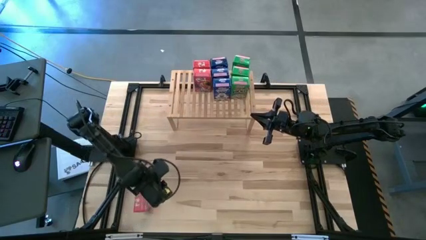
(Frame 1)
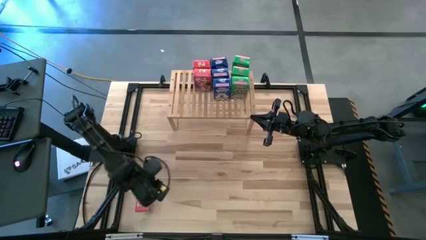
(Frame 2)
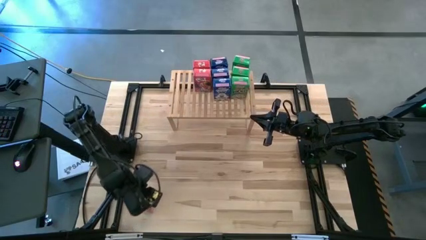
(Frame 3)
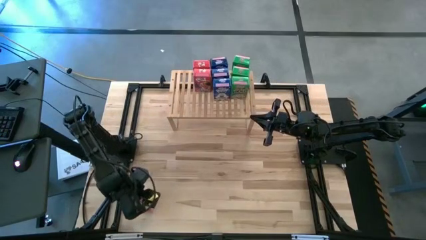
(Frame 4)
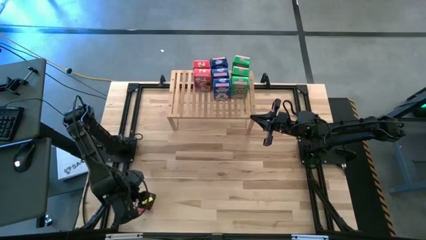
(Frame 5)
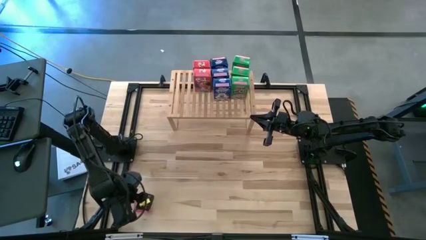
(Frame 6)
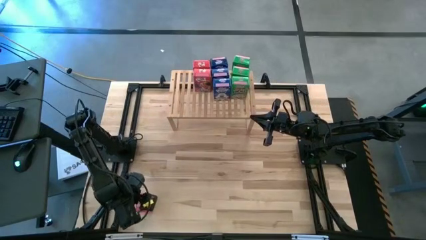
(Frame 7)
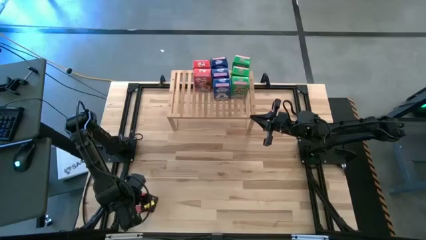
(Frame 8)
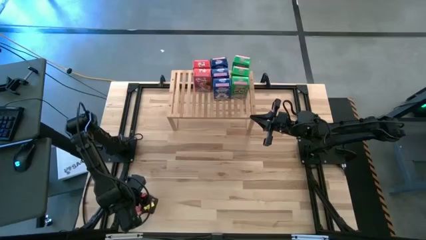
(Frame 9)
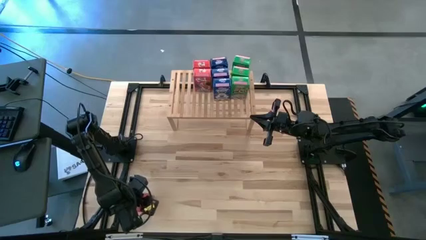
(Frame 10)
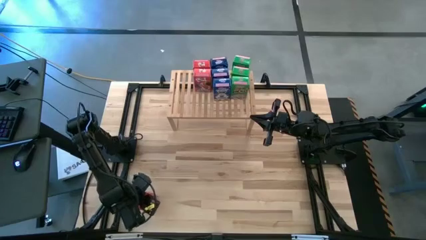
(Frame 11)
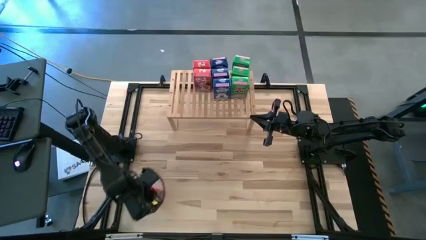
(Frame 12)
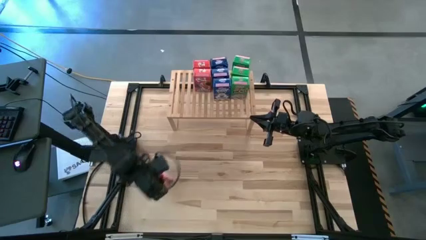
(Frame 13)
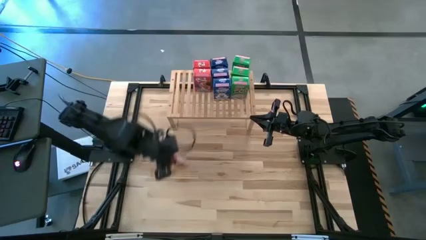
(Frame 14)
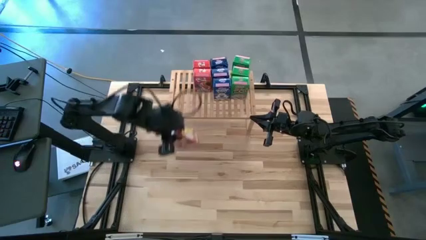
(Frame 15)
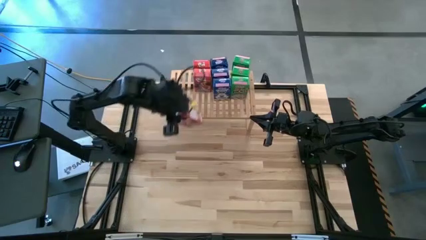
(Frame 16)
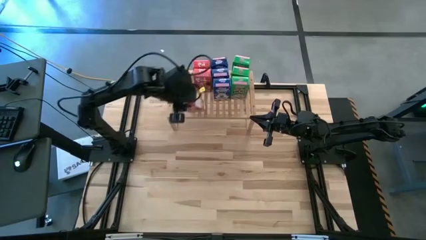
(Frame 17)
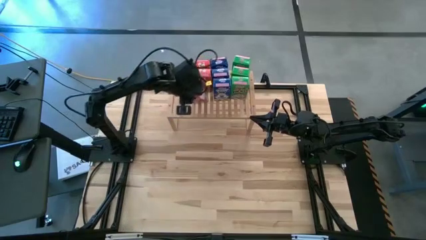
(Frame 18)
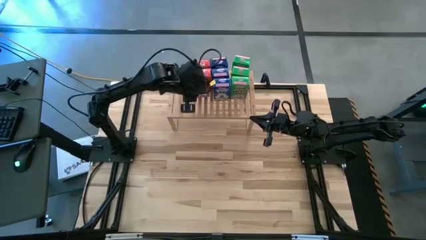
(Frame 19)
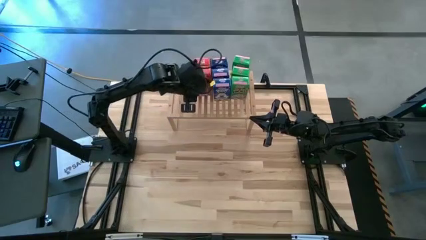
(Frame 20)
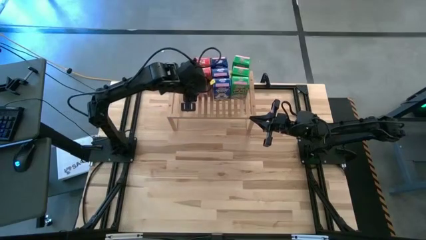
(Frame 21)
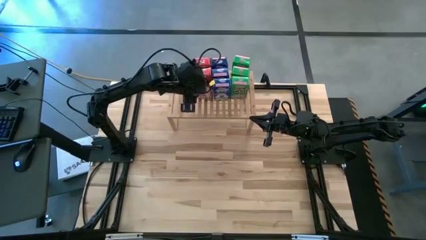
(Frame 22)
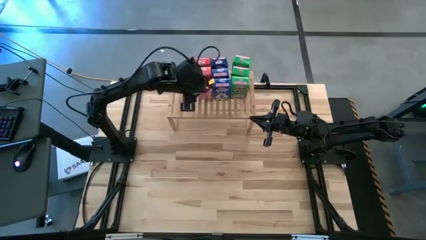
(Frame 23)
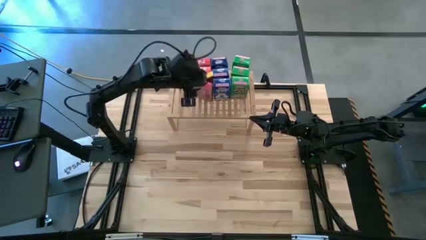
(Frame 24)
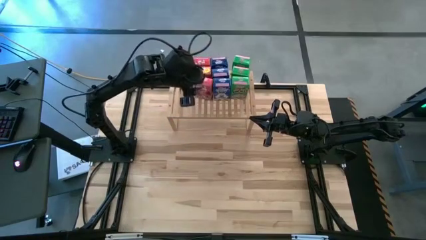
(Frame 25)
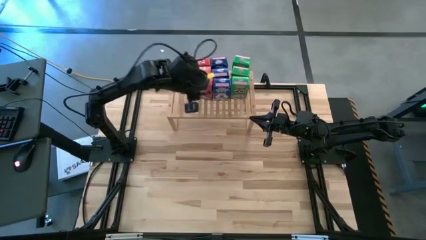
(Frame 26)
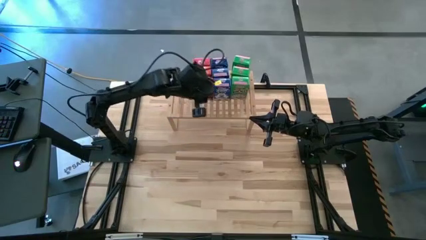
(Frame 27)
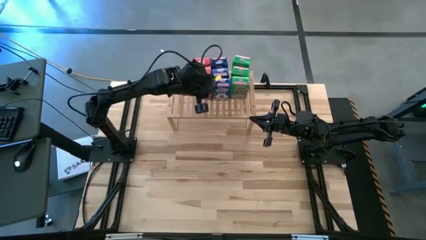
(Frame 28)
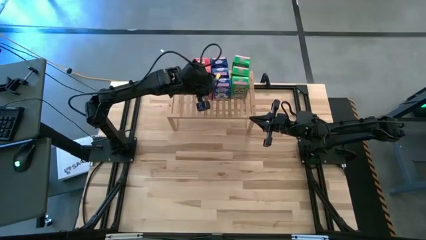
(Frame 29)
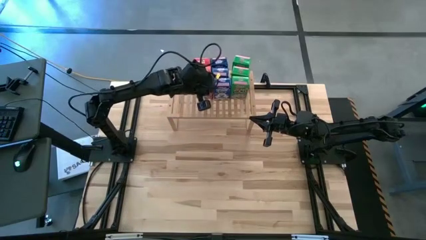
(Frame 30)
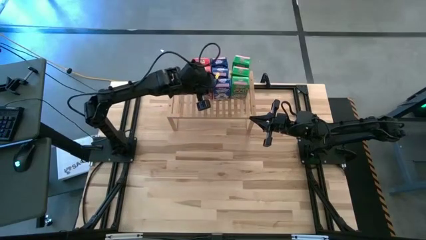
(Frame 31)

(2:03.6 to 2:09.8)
Task: Stack cereal on shelf
Put the red cereal box aligned with the other red cereal boxes on the shelf

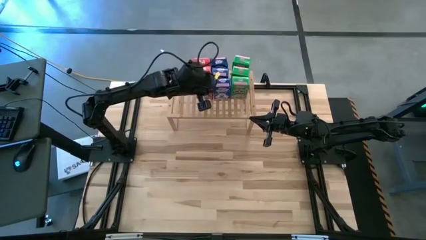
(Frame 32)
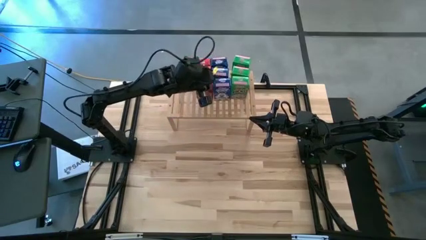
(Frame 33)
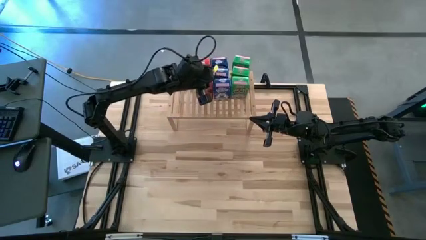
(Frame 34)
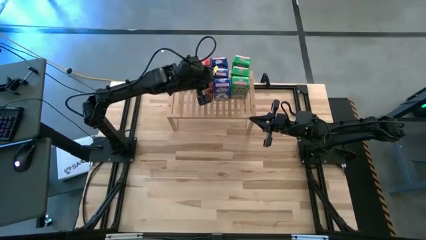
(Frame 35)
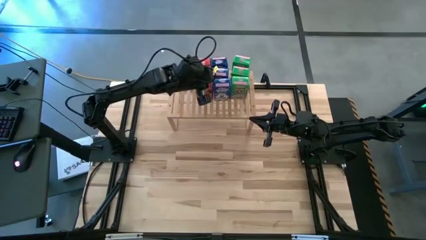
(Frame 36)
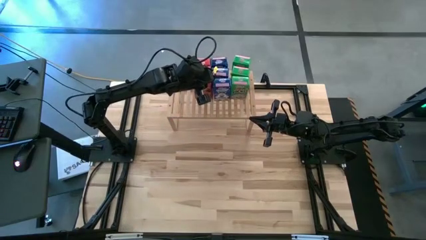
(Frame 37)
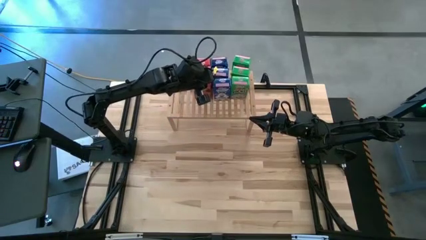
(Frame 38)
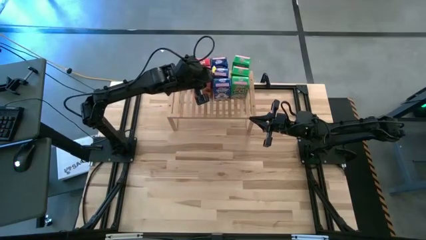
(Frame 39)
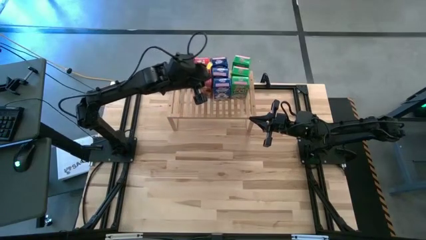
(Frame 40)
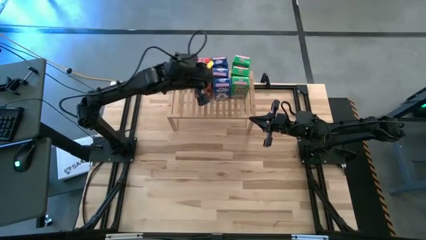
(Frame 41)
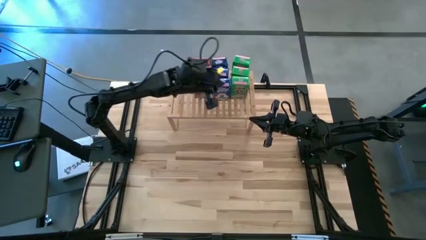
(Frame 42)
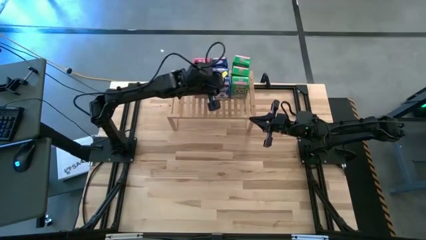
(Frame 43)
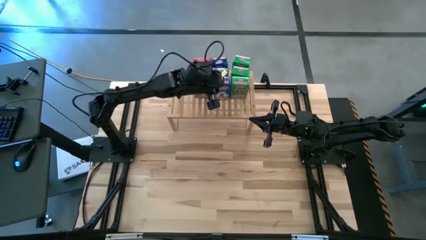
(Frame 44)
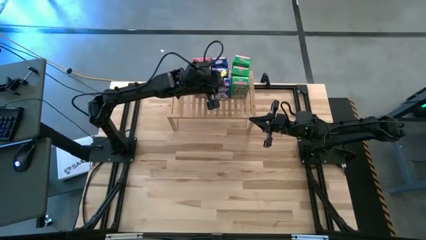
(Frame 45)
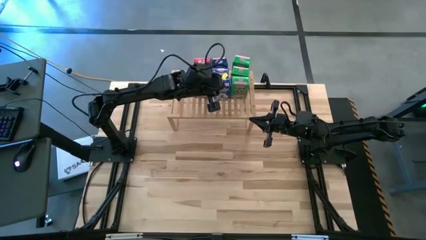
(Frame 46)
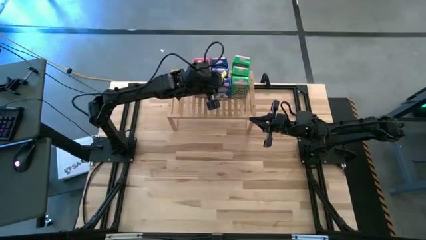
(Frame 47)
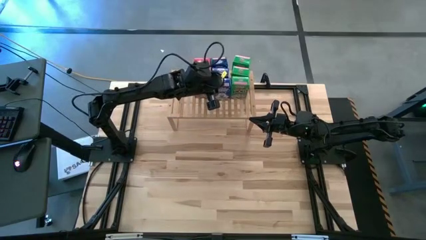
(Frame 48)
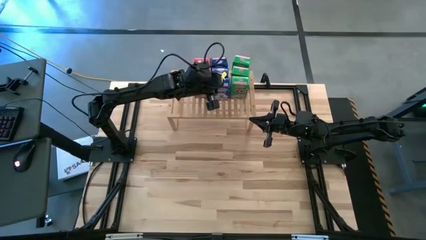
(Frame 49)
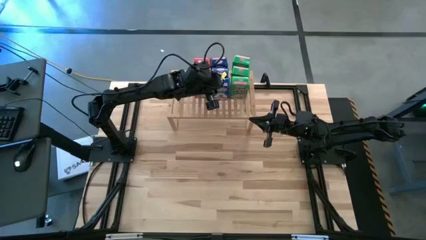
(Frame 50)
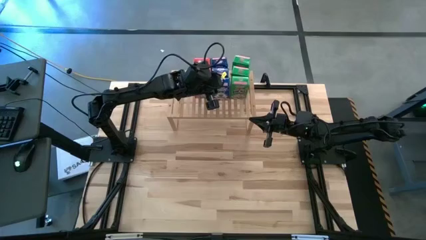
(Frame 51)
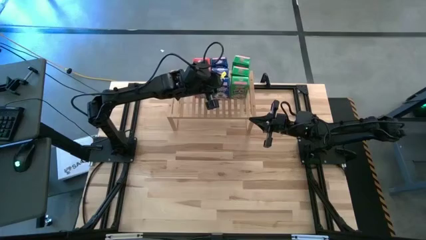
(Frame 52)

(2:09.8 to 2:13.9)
Adjust the blue cereal box on the shelf

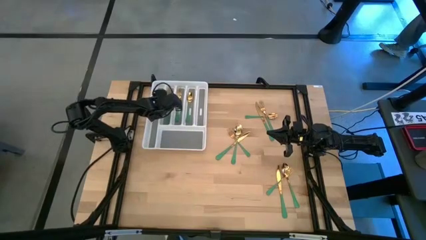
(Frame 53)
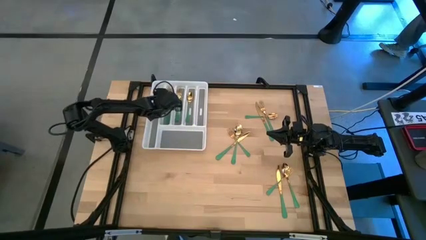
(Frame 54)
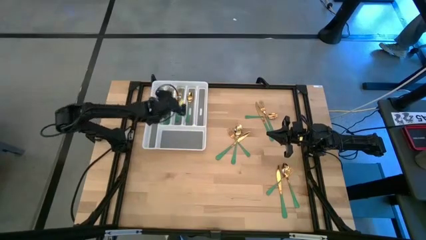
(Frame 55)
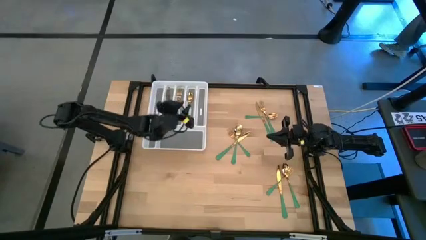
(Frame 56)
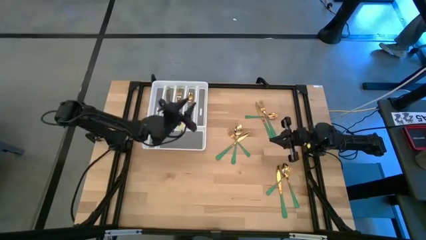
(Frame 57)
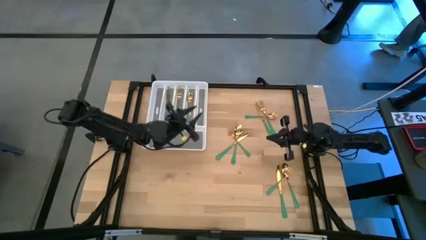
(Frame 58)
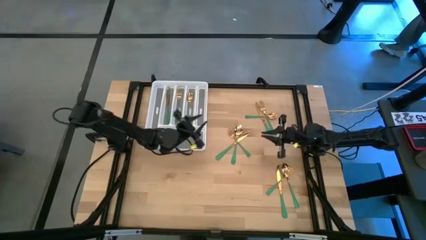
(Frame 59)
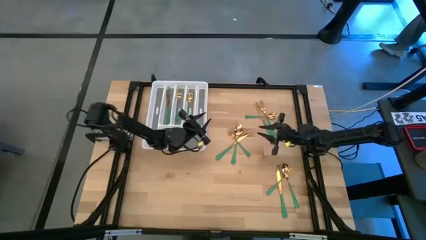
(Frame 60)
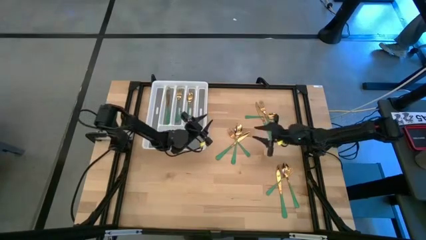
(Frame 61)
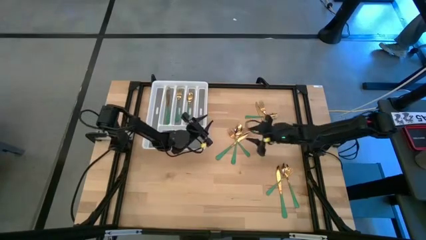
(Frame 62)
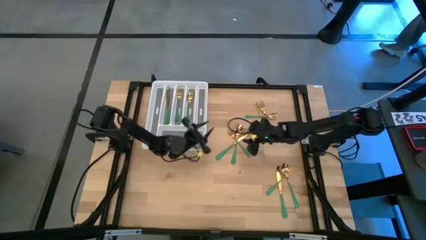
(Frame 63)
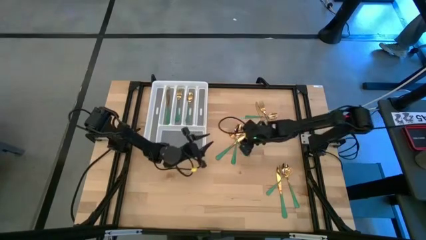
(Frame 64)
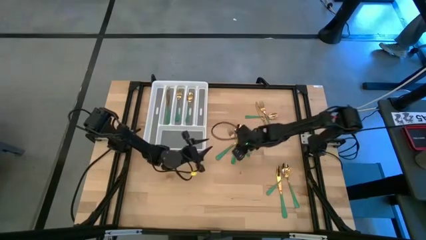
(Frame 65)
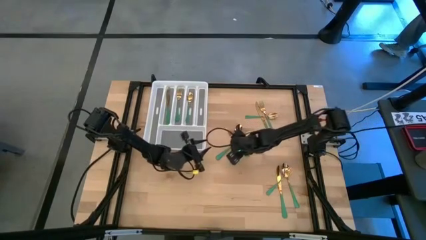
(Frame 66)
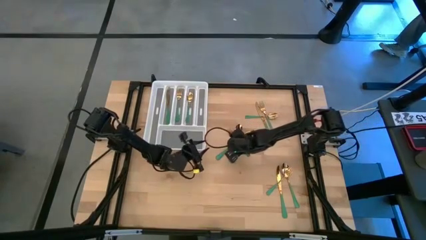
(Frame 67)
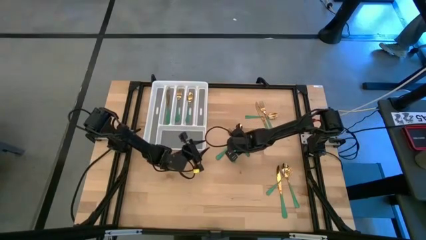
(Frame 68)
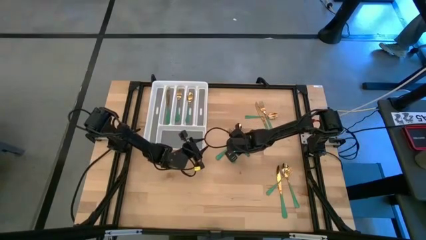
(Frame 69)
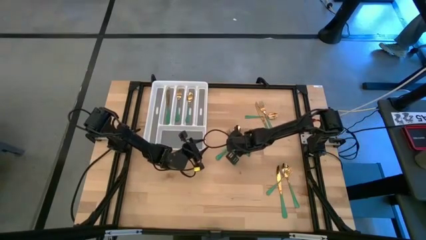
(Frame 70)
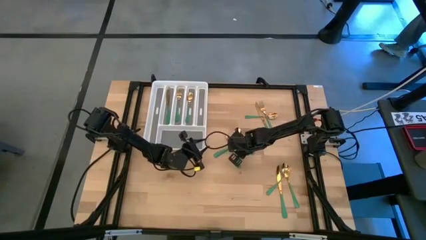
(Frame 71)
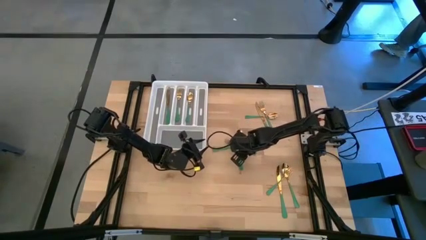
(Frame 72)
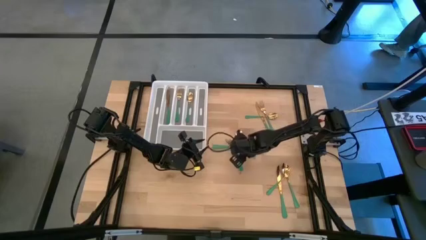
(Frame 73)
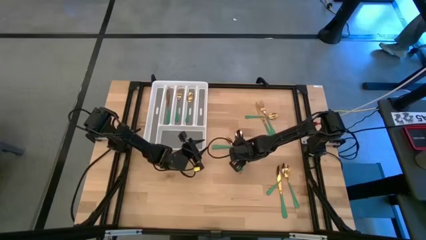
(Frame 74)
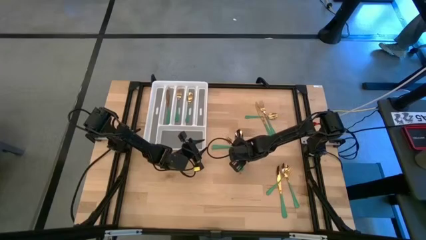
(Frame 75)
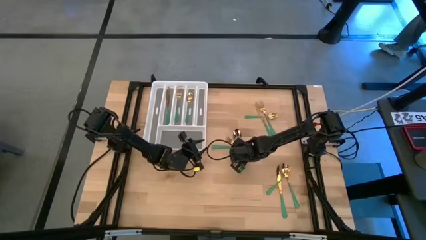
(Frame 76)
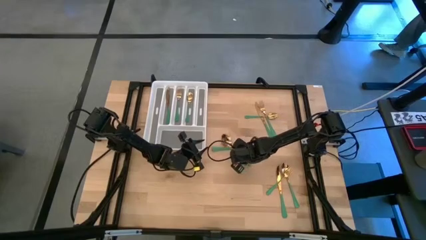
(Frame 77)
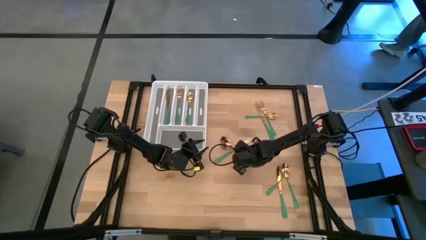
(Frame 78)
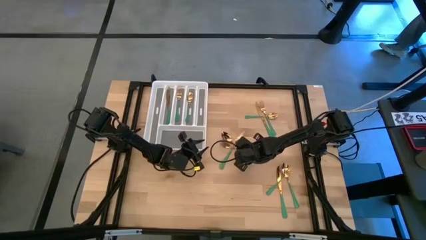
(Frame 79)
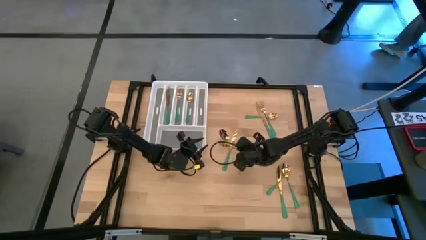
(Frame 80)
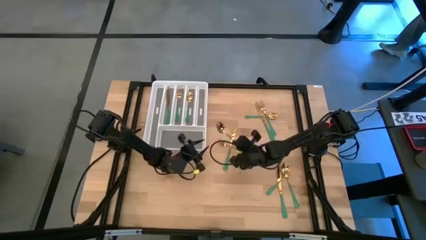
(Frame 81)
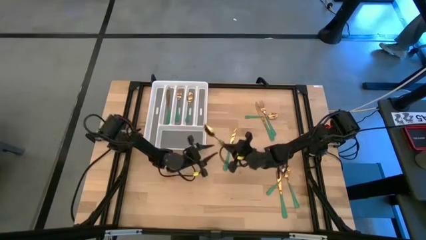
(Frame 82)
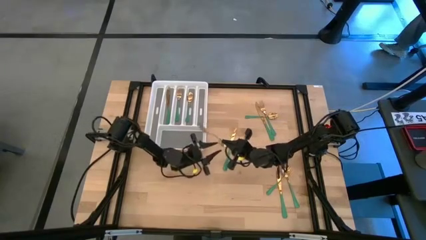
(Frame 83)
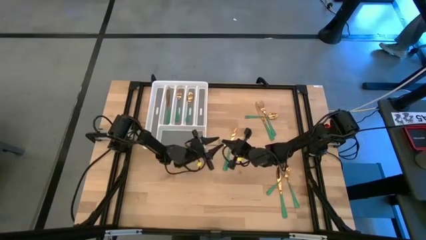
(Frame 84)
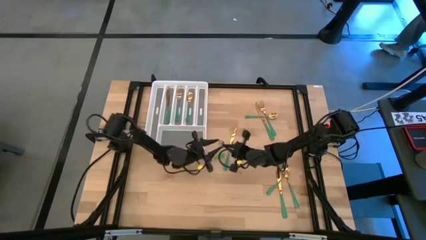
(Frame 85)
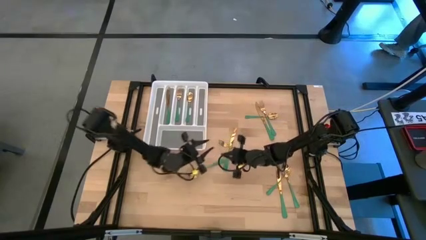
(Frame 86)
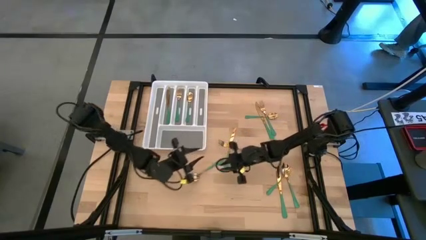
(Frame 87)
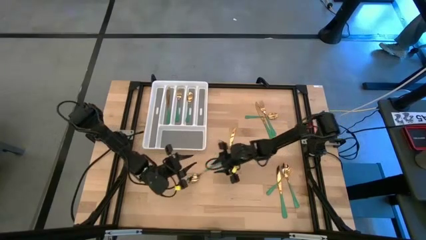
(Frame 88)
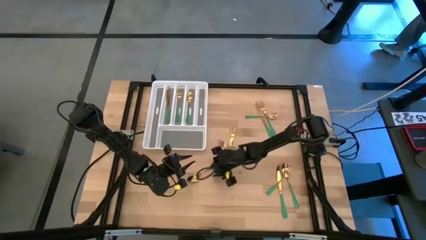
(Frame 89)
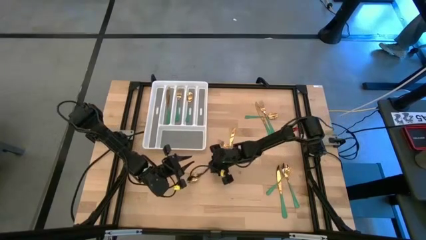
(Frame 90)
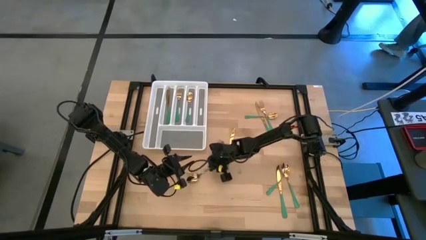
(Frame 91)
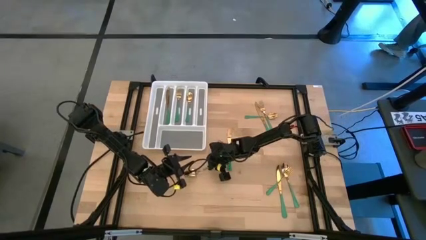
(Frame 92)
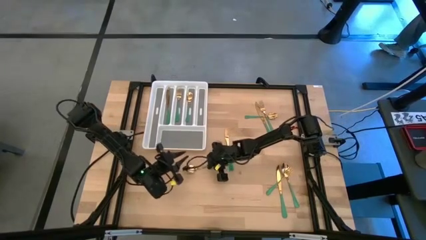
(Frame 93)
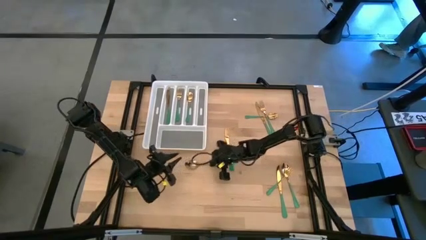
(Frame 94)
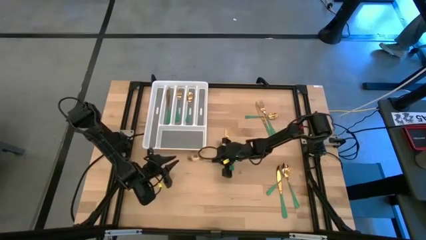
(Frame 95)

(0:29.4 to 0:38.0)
Task: Sort silverware
Put the green spoon into the white cutlery tray
